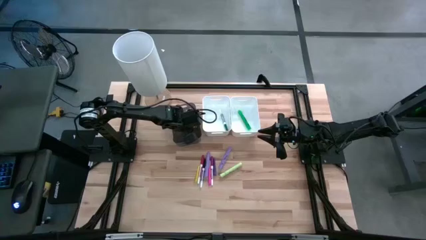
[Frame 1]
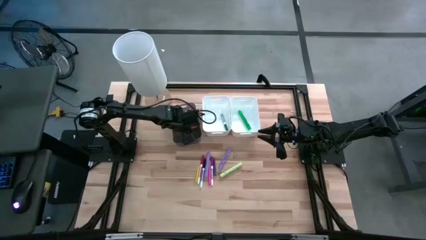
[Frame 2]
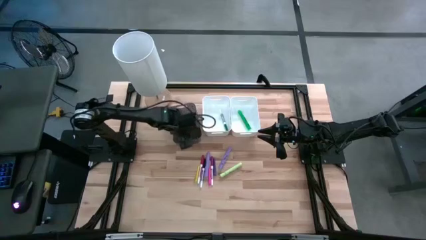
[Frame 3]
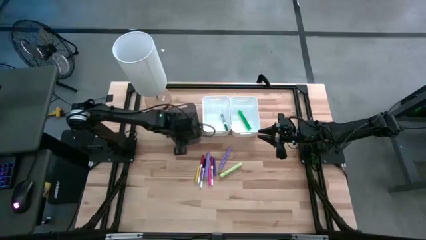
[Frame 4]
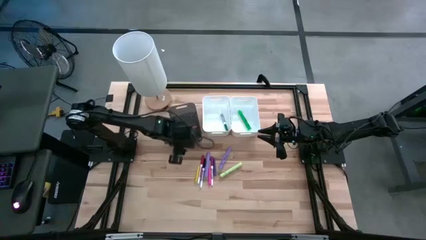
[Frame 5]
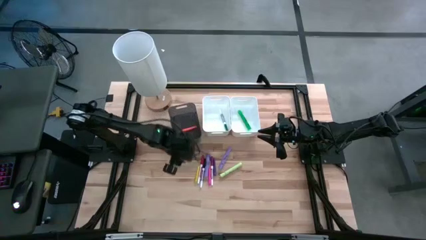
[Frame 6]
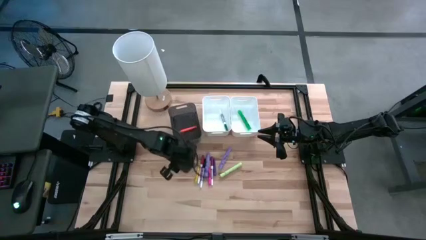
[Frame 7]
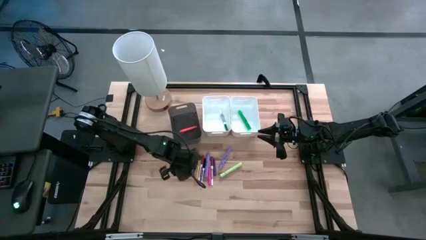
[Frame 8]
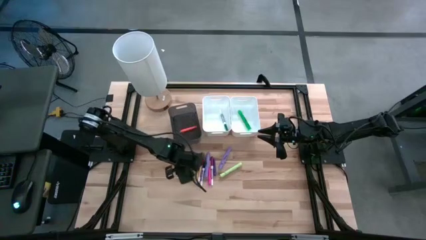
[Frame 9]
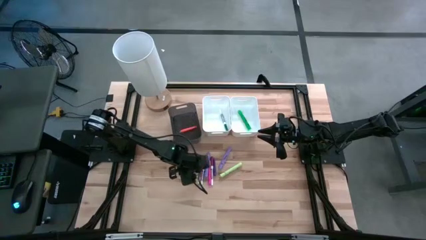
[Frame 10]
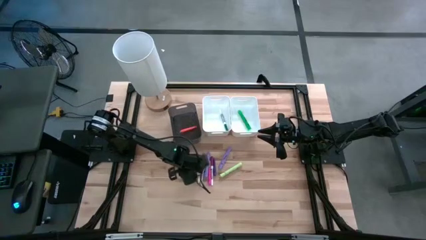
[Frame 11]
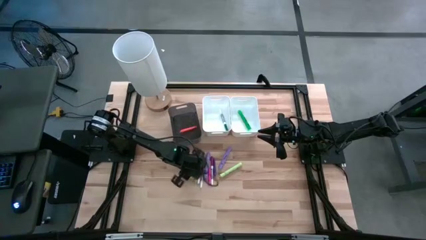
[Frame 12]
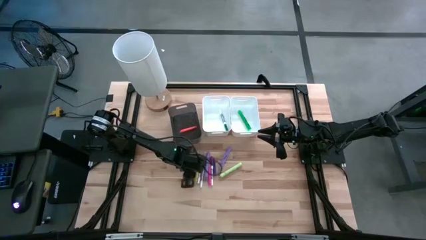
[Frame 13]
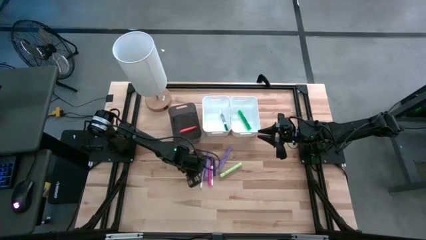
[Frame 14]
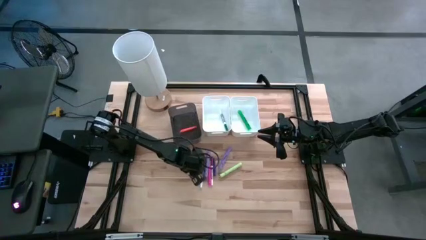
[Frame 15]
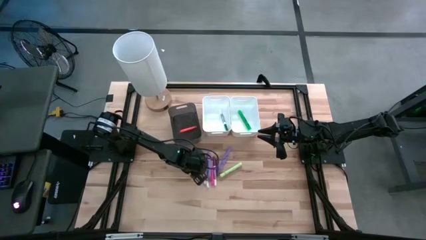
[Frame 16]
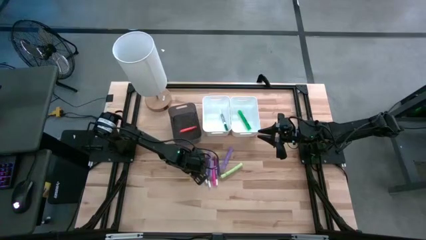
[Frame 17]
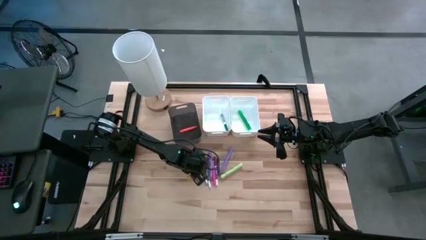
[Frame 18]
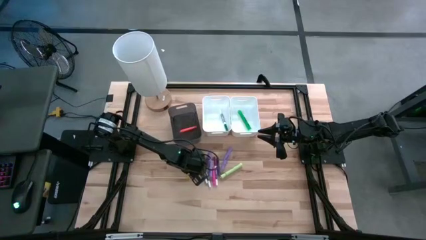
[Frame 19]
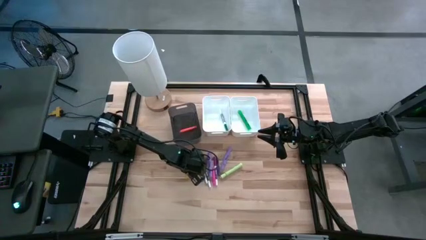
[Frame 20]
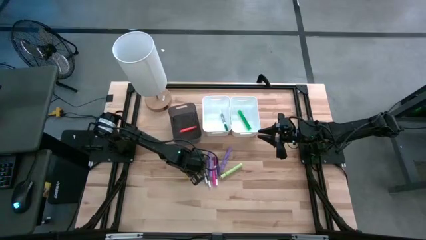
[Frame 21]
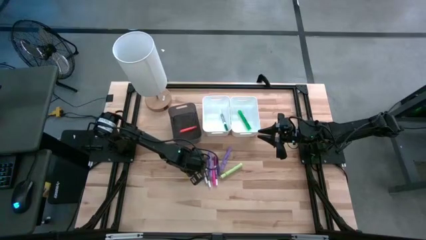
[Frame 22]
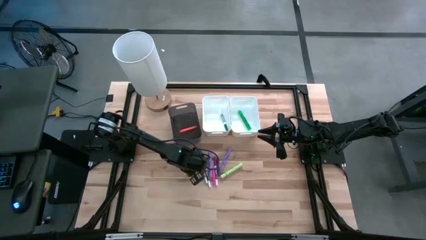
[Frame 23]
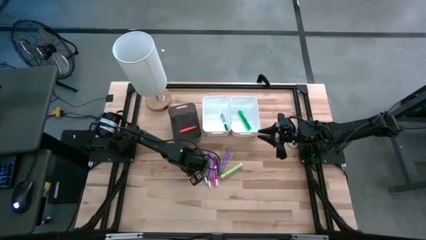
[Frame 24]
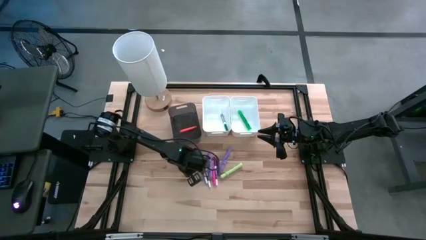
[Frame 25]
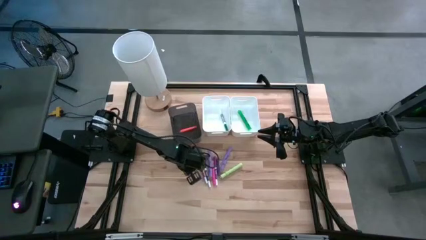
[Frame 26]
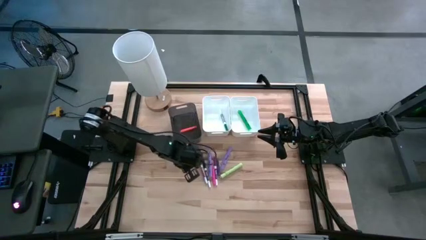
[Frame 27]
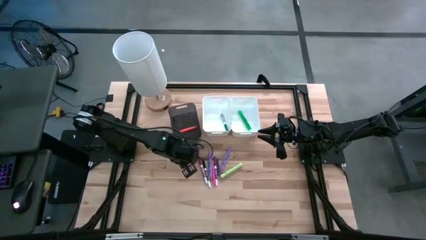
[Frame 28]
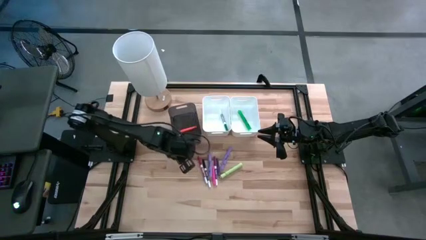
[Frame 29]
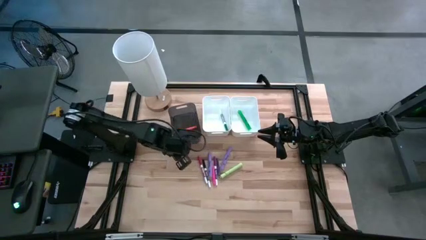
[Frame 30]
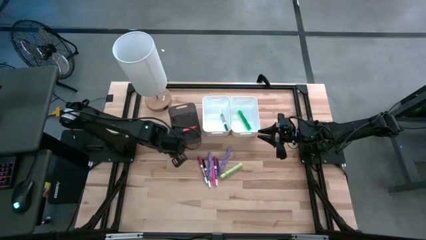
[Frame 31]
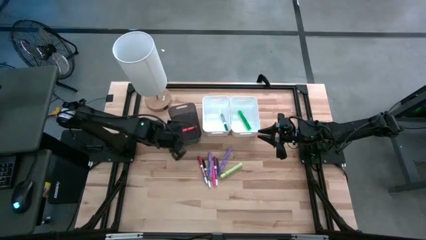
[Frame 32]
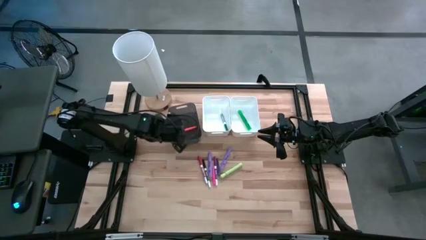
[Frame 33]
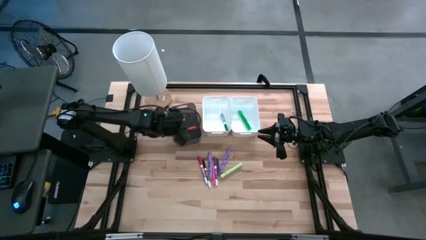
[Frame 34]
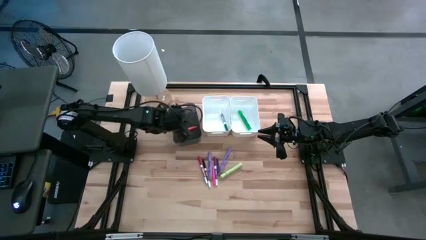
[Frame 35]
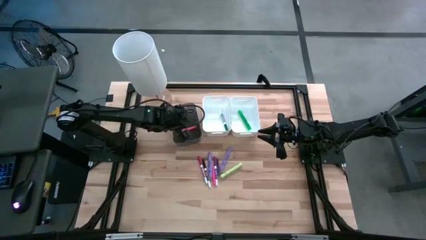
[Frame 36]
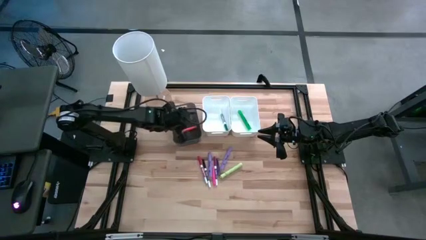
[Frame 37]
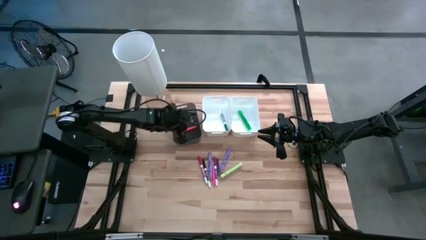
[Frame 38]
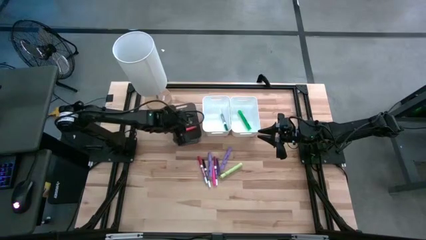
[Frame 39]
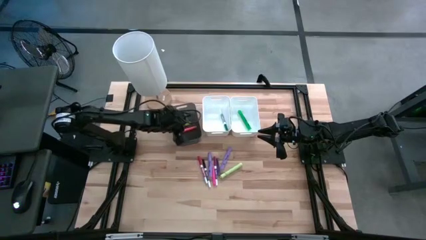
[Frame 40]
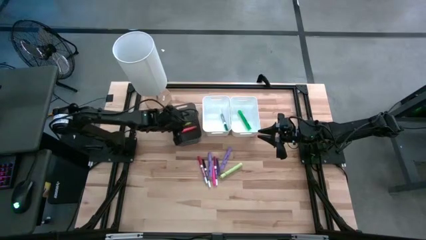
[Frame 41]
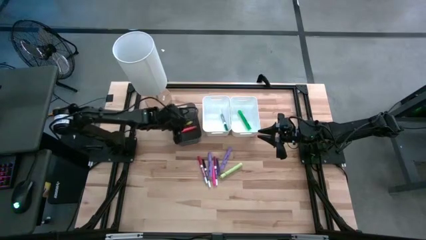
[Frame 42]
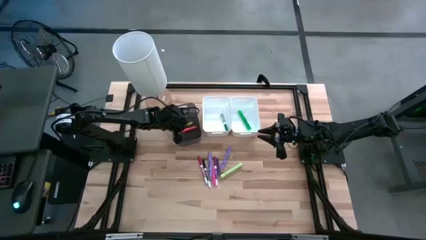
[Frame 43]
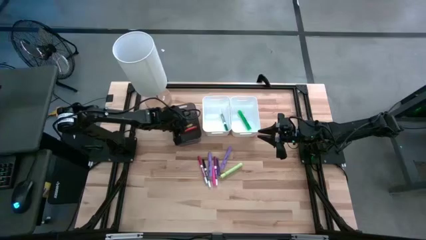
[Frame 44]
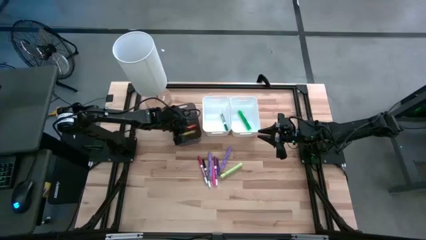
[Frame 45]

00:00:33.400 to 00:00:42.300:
Task: Pick & Place Markers
Put the yellow pen into the black bin

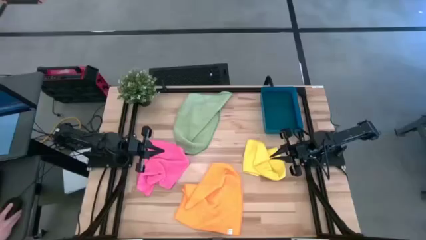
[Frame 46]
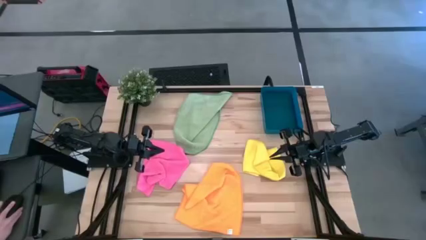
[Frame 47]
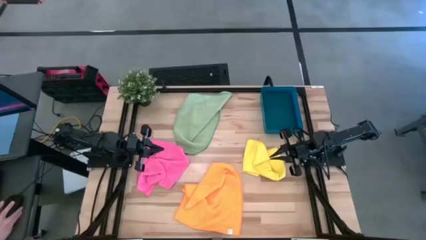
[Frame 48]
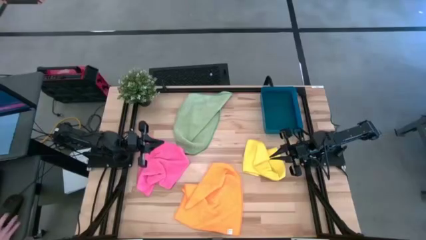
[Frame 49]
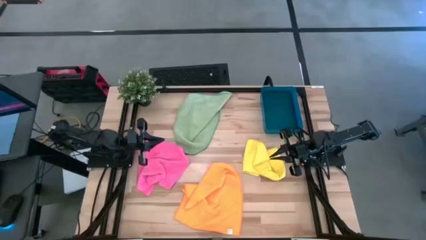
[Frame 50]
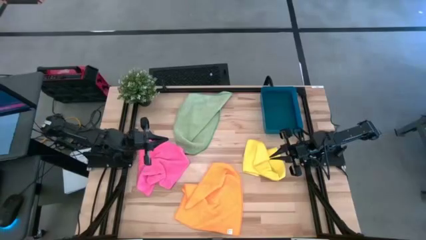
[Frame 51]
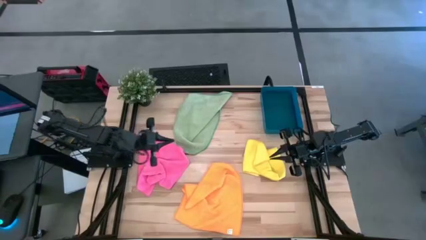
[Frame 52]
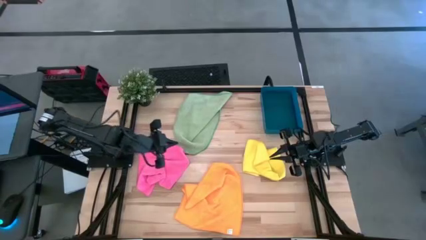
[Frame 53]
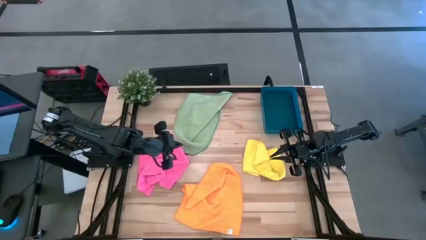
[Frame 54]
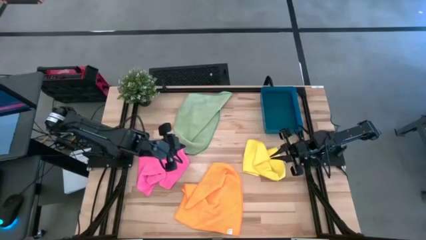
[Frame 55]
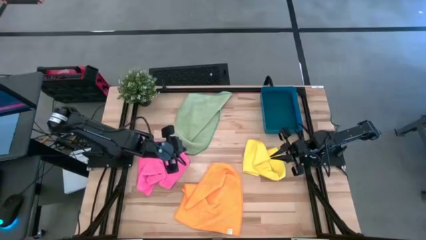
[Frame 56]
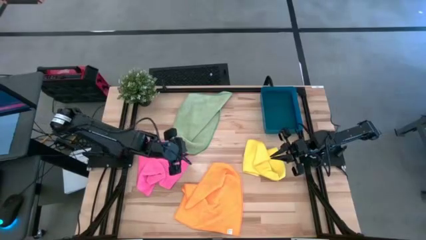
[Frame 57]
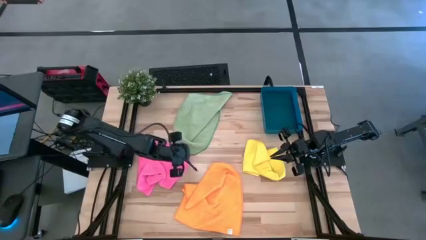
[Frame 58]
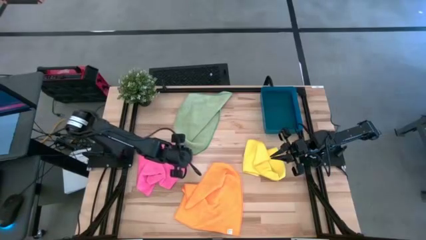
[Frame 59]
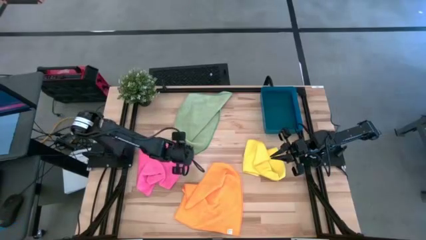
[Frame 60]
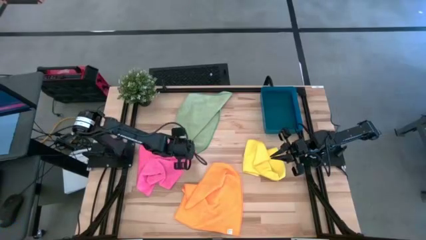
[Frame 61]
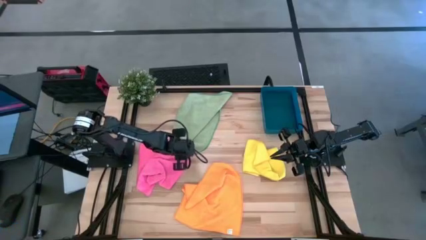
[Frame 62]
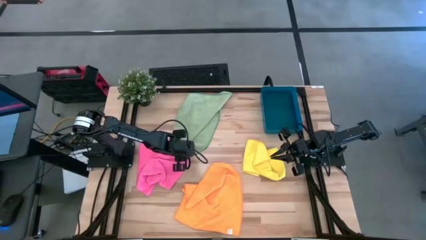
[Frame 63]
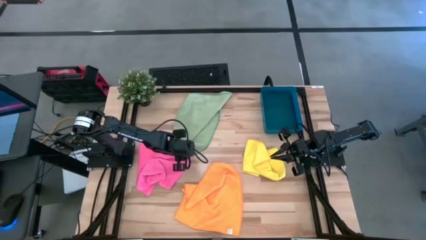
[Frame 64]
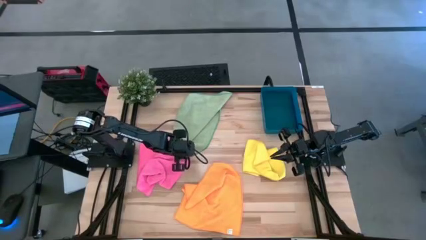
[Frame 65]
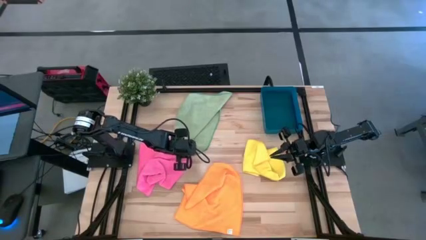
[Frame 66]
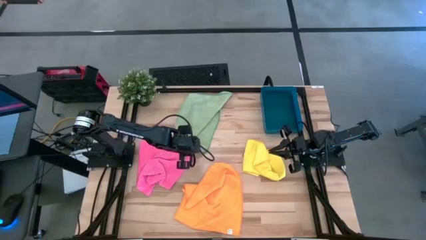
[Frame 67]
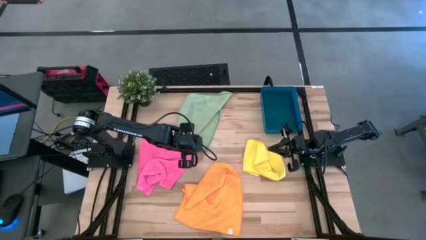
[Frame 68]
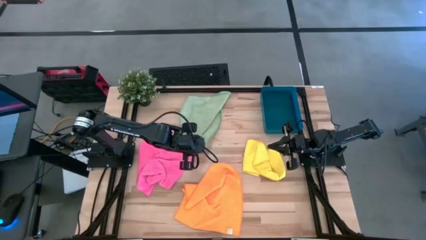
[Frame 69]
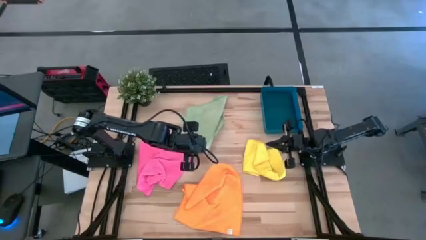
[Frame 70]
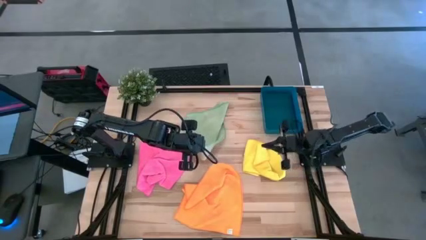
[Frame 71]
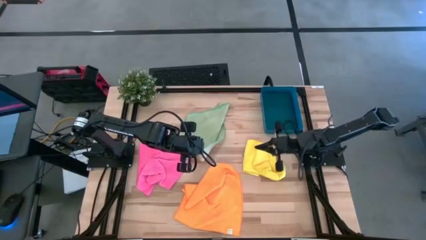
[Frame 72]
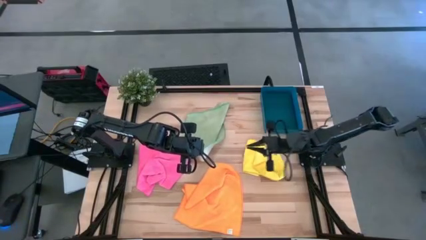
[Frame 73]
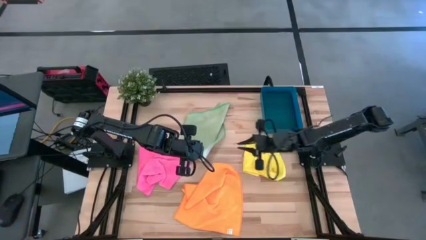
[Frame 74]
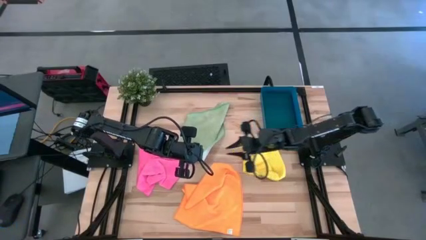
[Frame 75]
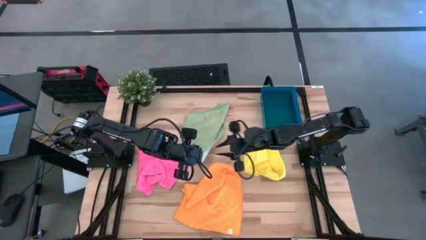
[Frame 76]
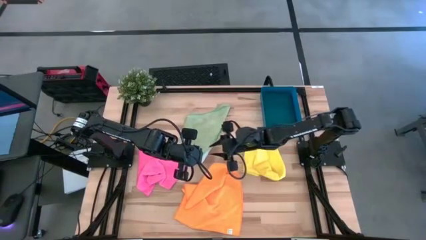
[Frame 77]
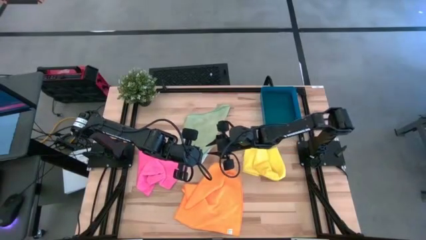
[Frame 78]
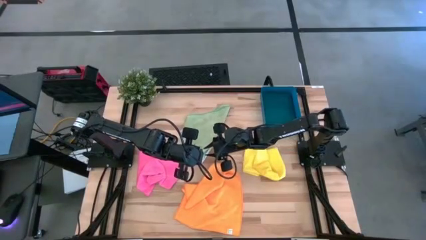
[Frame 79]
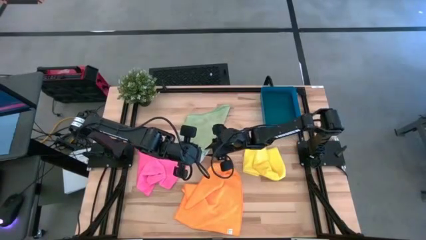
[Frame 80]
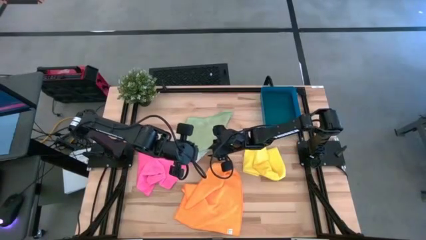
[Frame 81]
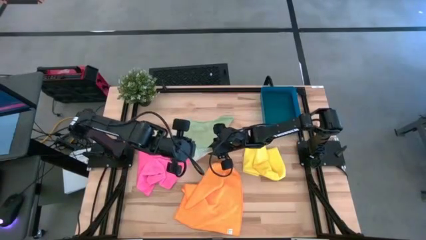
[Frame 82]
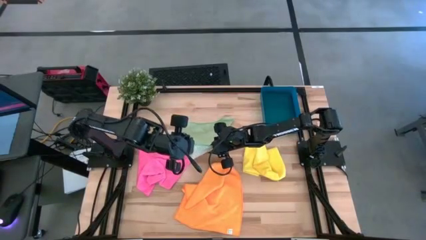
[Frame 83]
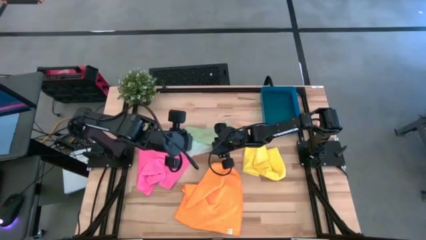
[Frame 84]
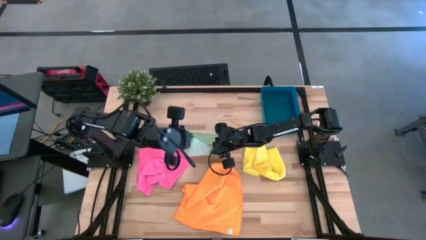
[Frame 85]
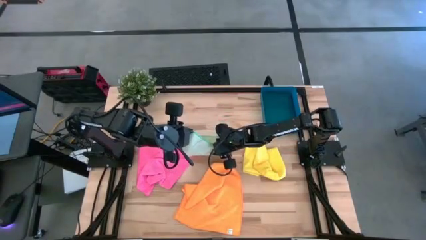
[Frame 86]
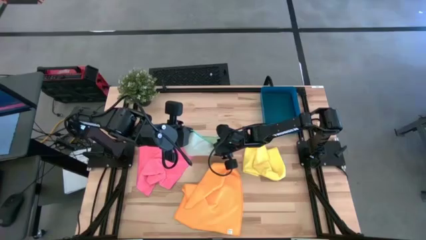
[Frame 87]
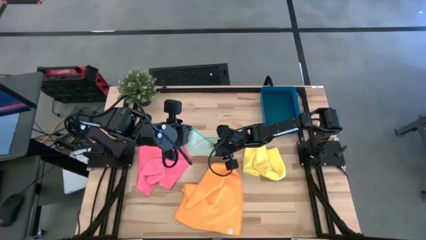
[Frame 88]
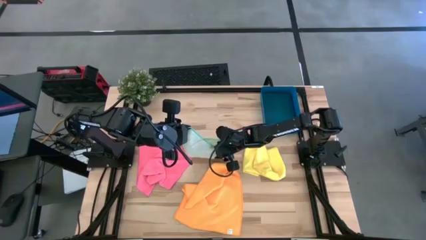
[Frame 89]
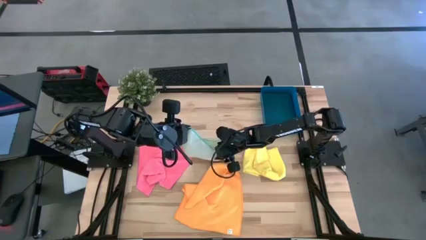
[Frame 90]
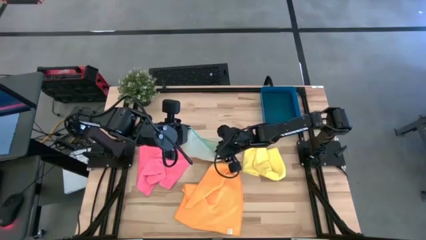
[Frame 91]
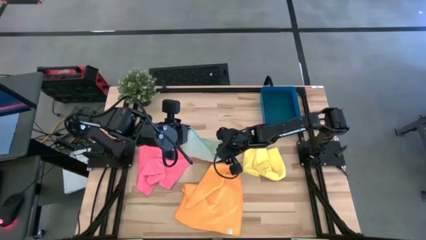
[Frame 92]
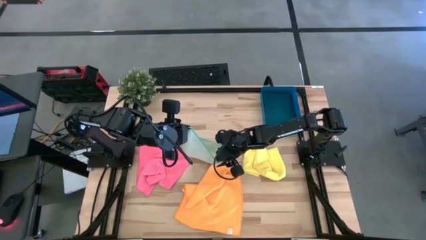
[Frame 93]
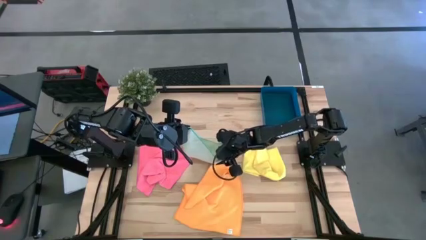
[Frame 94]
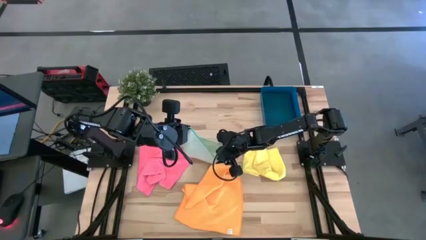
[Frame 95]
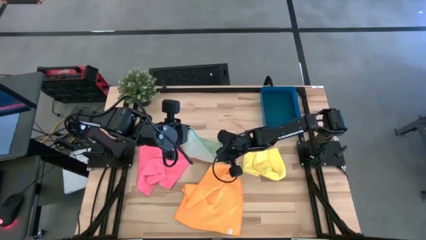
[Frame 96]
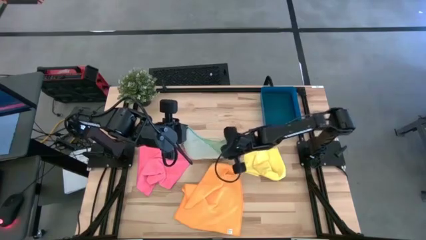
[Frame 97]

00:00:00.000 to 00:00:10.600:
Task: Fold microfiber towels
Fold the green microfiber towel
